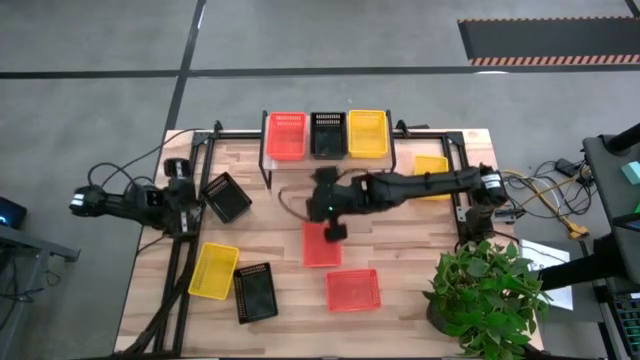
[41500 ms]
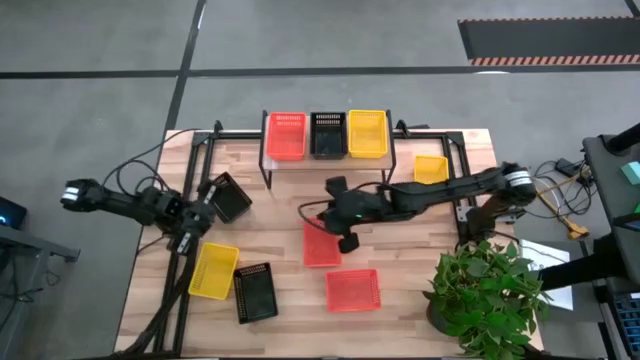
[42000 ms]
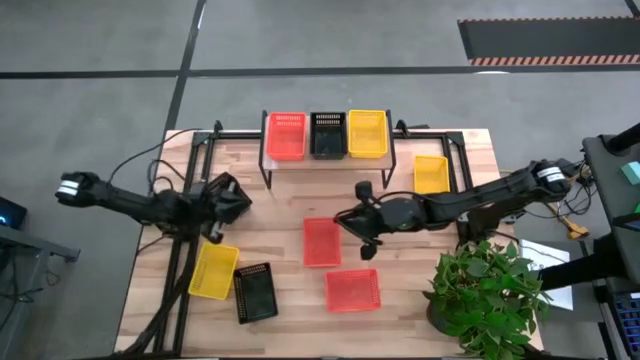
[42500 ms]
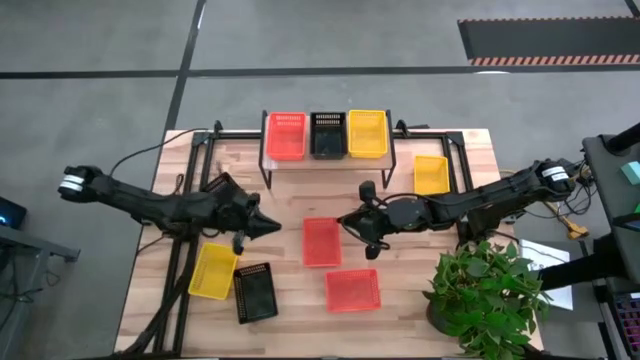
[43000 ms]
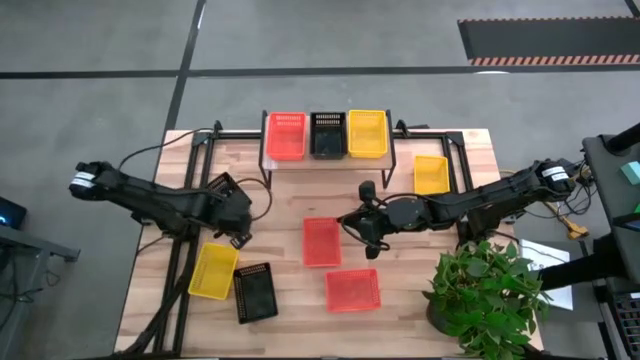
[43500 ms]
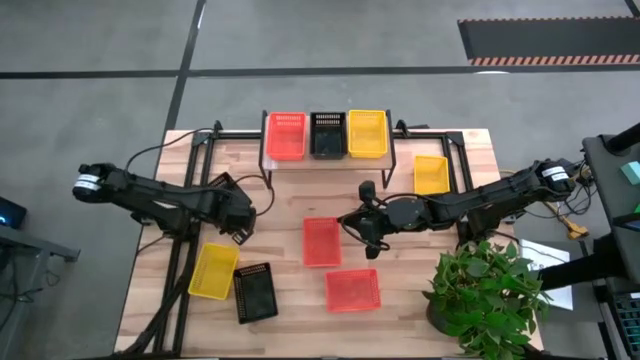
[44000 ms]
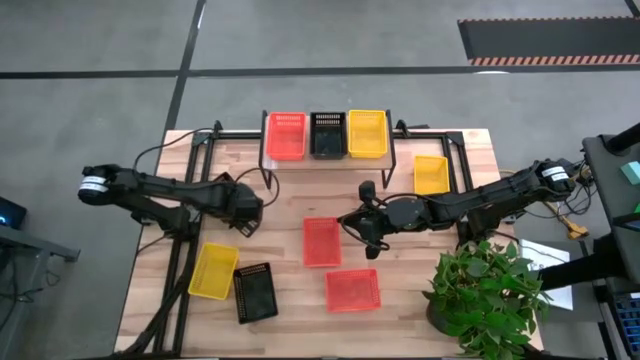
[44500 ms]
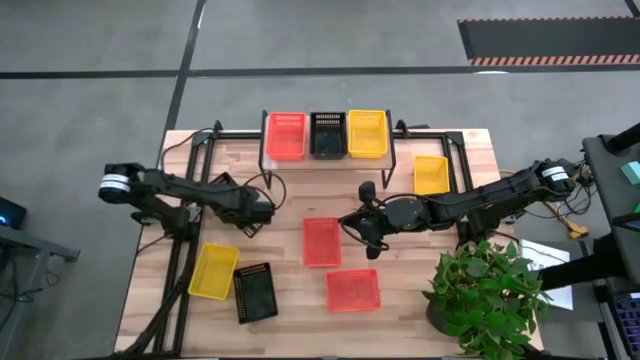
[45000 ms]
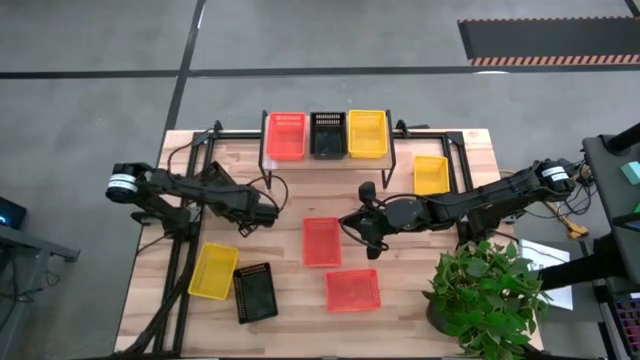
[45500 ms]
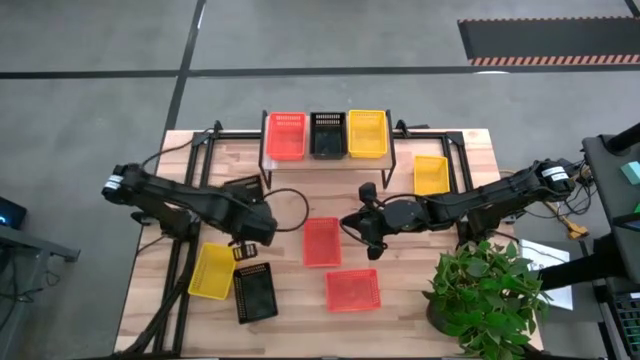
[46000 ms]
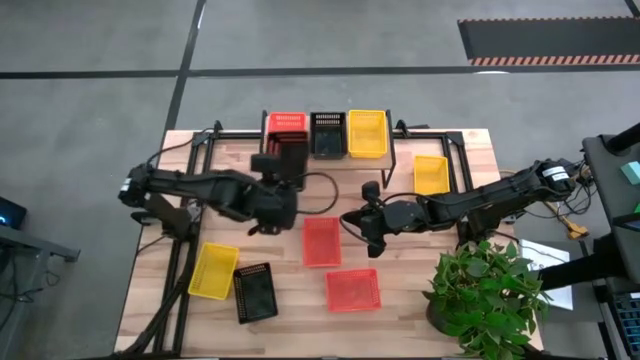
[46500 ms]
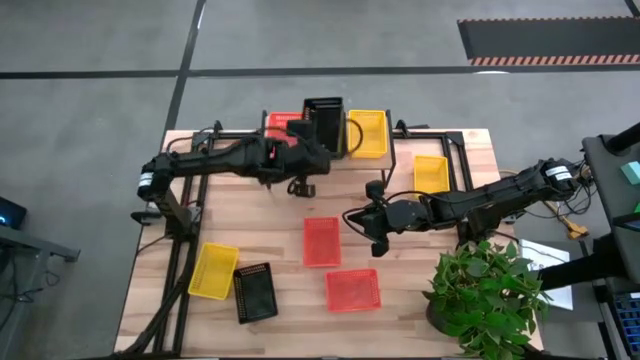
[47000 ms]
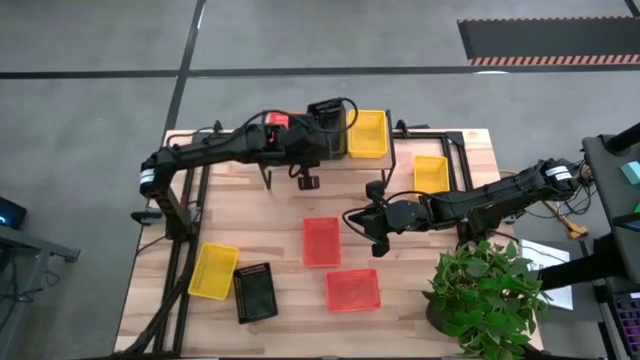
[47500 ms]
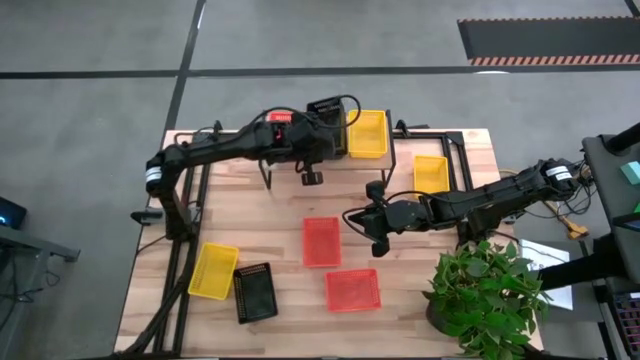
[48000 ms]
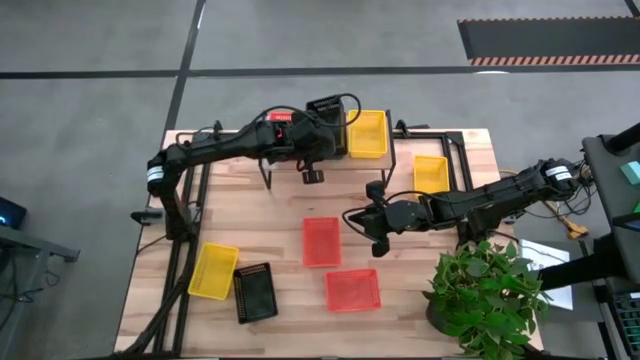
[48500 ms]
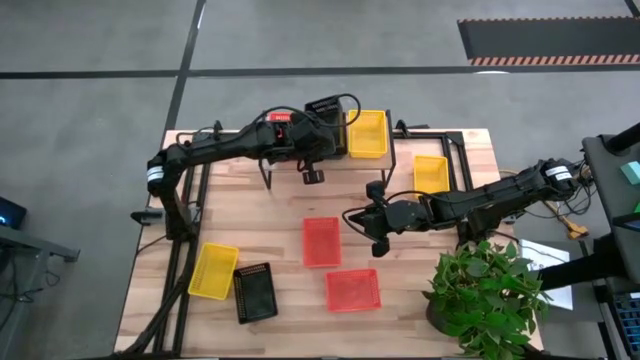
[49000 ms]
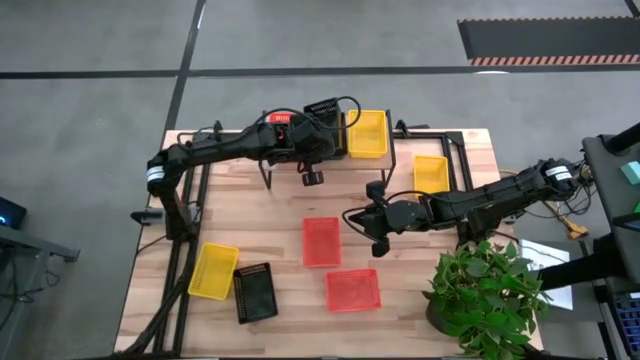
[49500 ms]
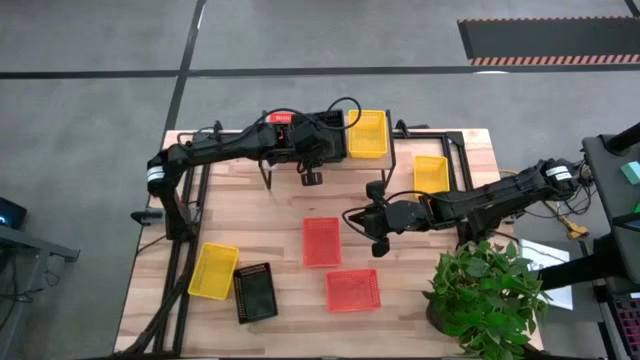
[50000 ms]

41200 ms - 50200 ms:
Stack the top black basket into the black basket on the shelf

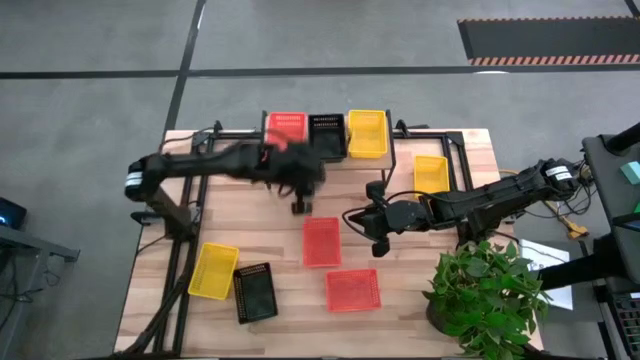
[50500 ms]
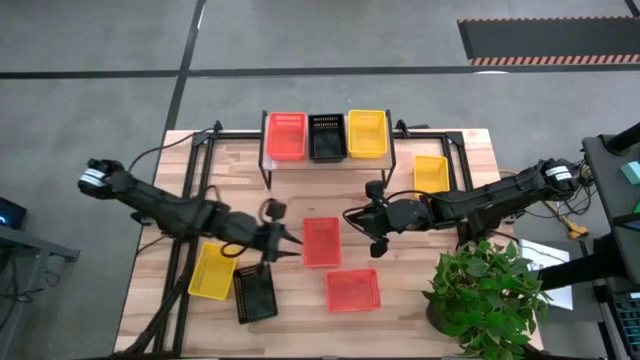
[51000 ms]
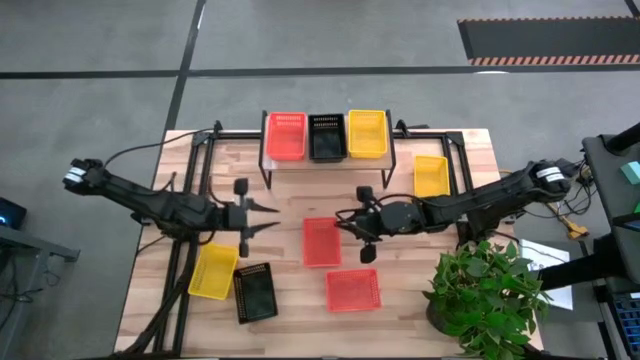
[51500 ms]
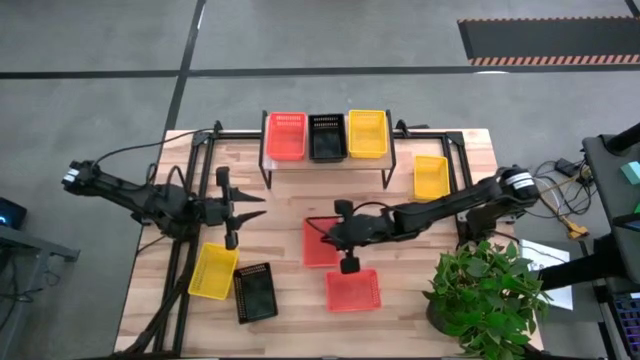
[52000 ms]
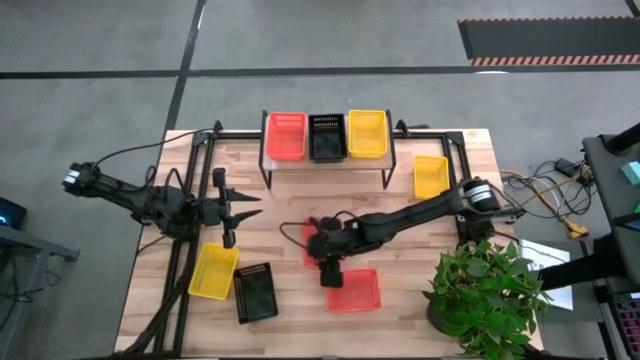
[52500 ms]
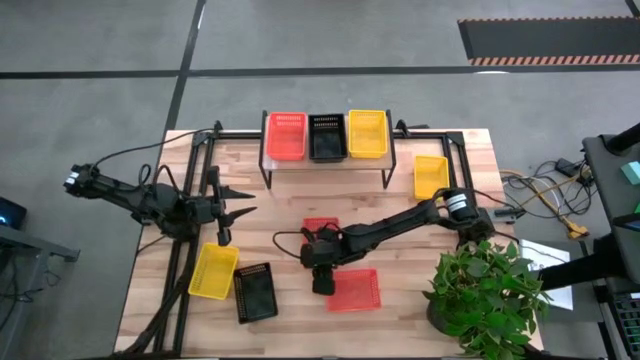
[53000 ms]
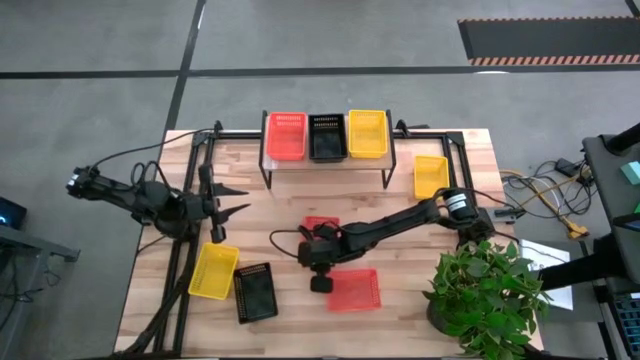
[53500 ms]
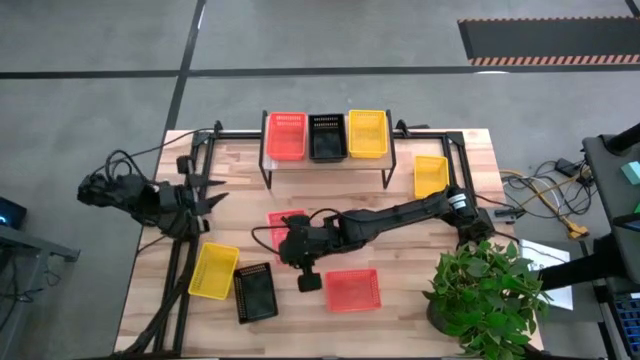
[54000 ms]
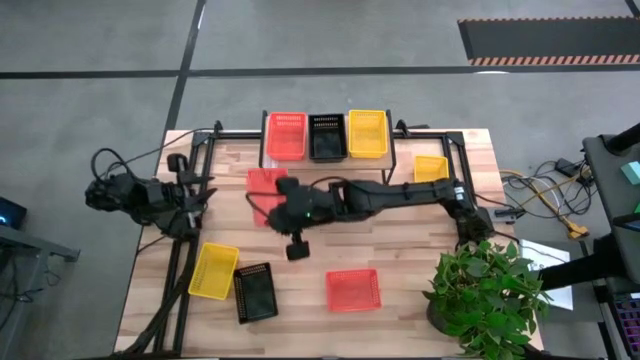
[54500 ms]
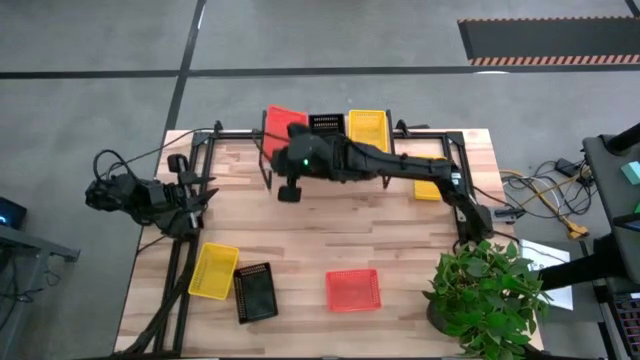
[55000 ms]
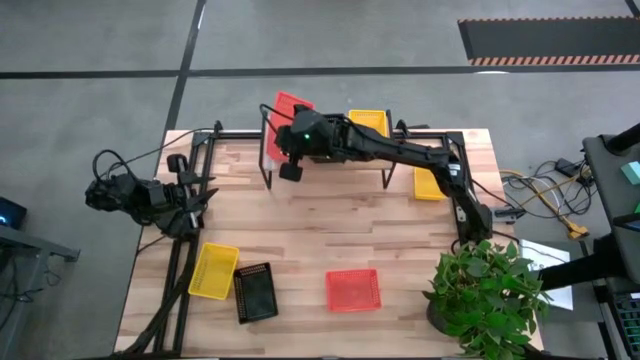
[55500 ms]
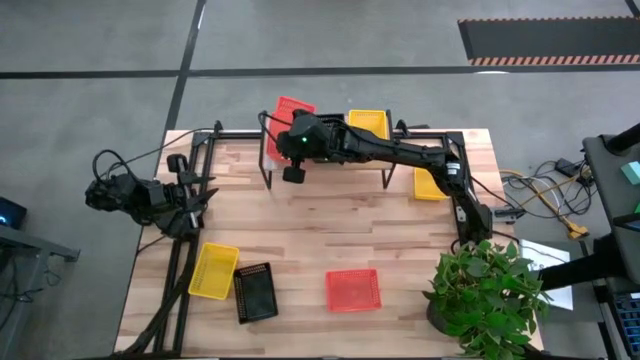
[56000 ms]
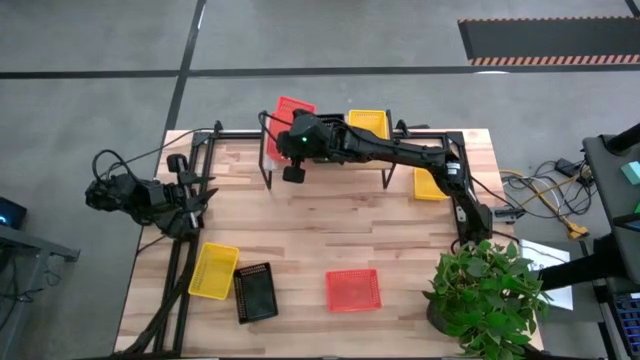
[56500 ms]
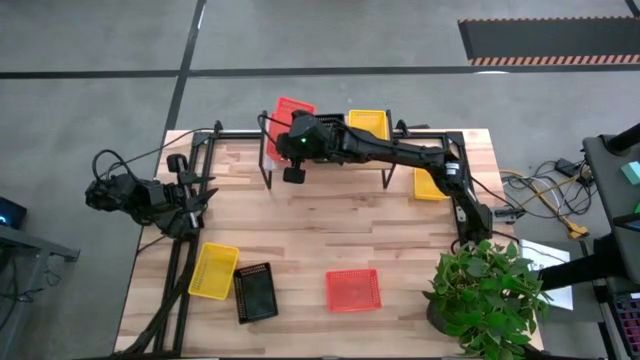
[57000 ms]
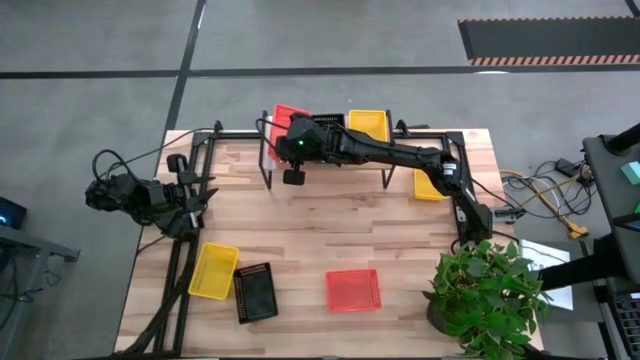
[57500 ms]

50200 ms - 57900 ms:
Stack the top orange basket into the orange basket on the shelf

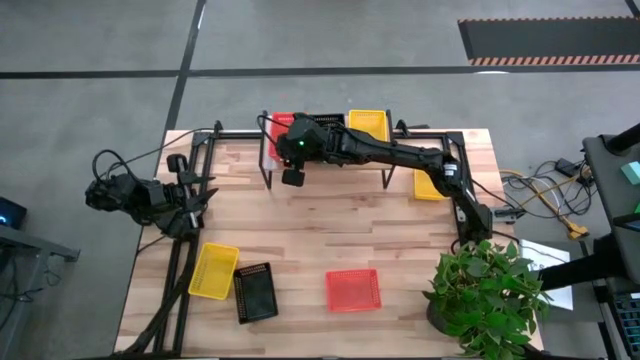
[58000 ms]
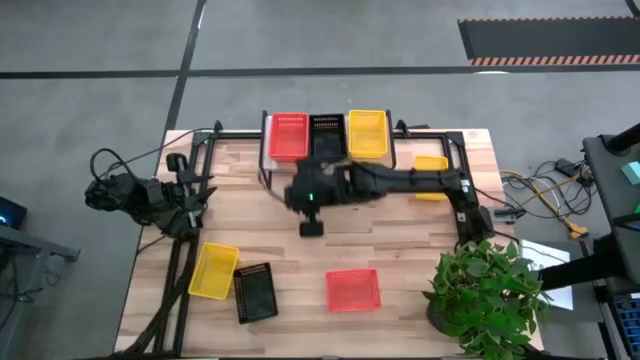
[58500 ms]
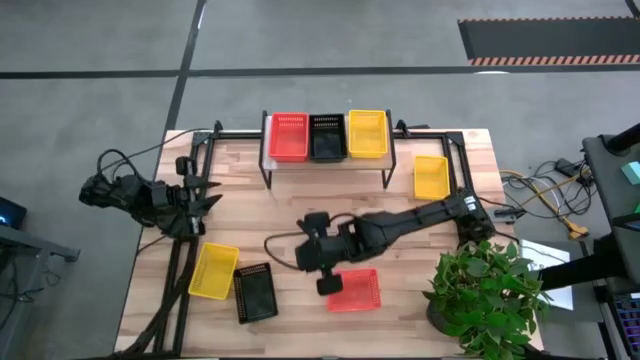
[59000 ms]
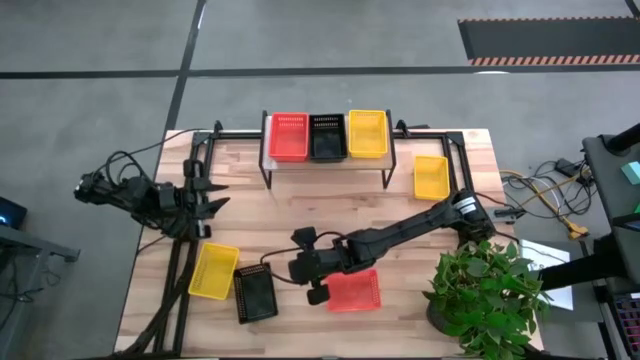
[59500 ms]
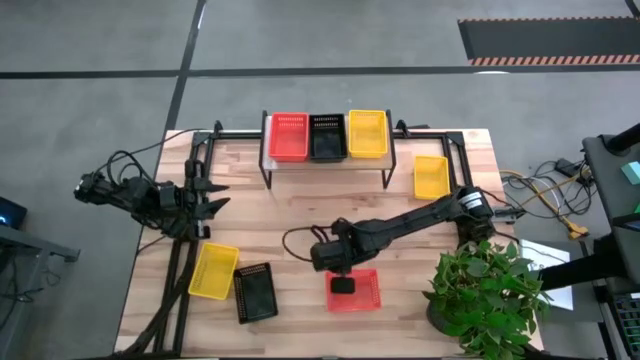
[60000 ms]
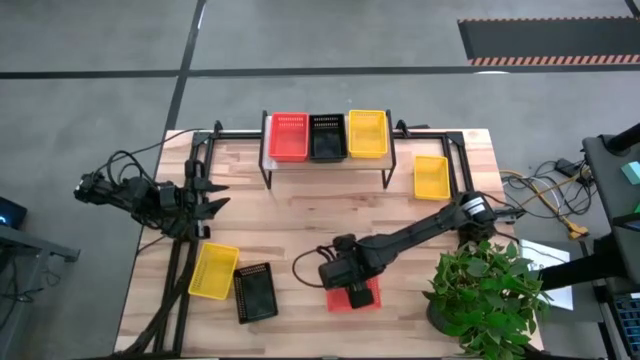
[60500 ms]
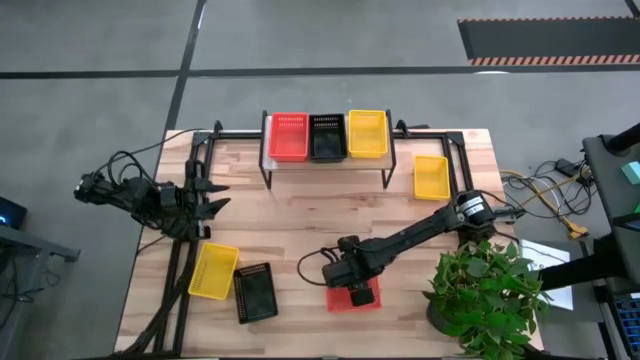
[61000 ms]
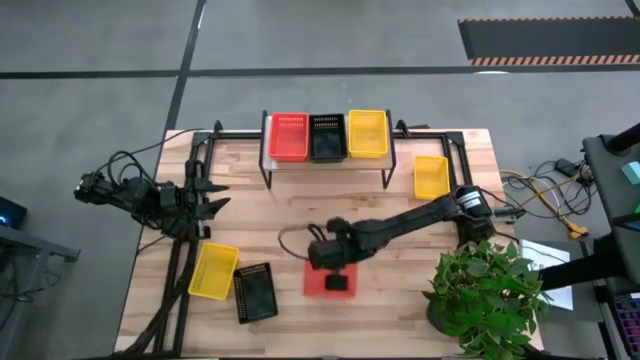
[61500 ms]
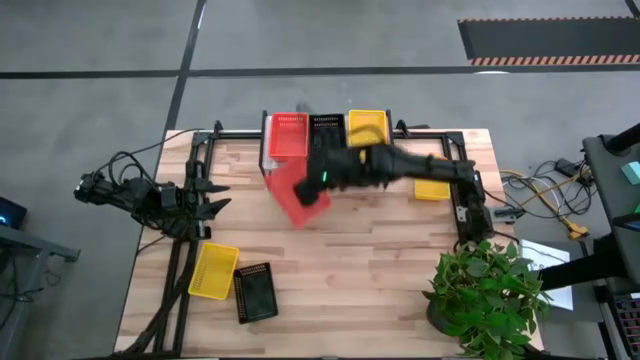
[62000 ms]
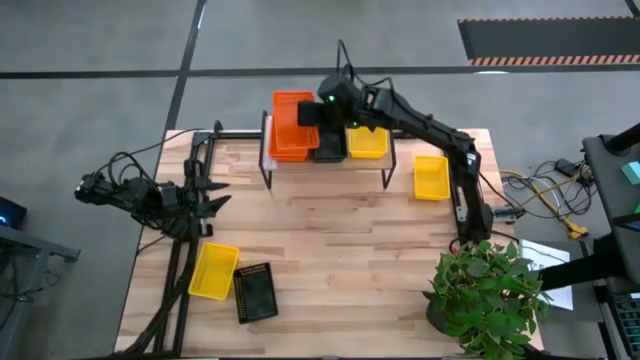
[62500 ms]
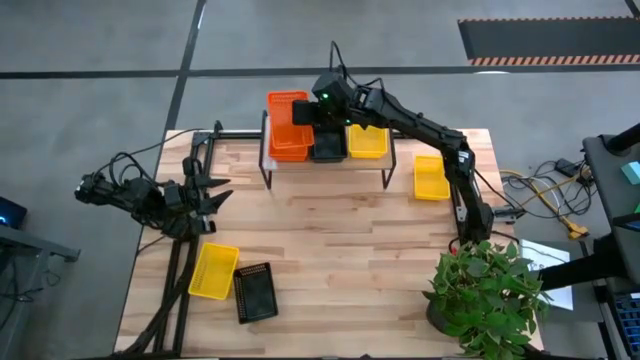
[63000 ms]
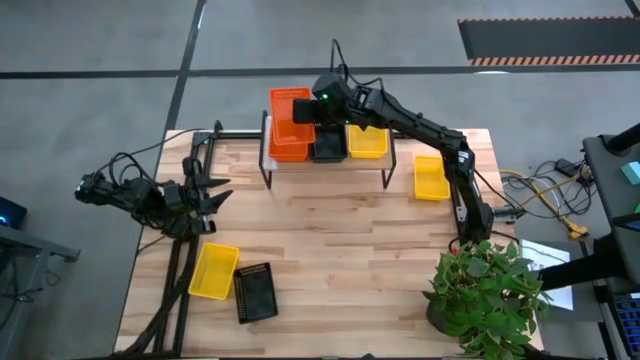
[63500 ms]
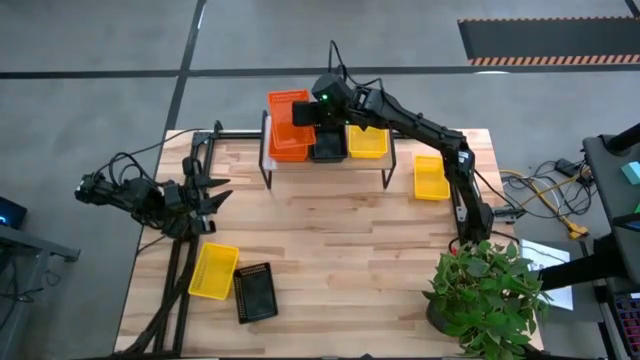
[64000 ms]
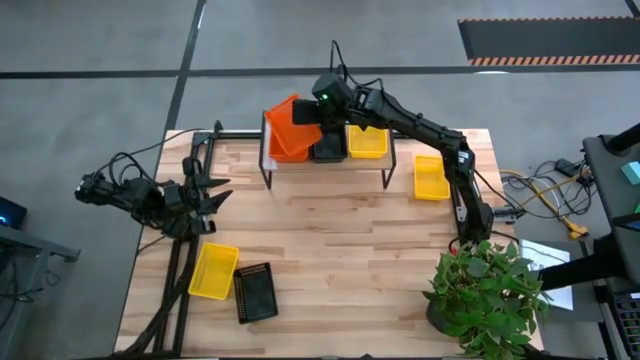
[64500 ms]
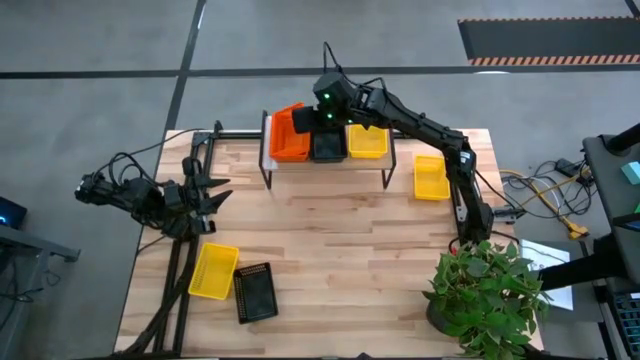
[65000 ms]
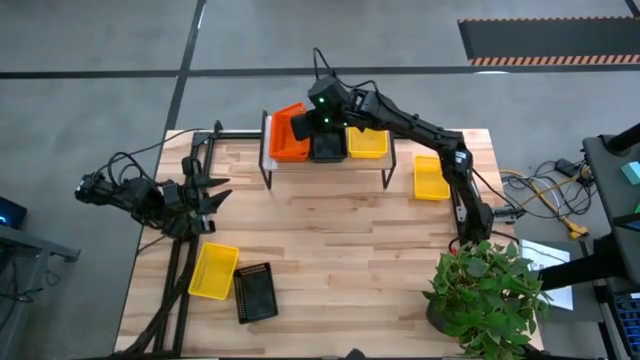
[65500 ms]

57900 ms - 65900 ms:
Stack the orange basket into the stacked orange basket on the shelf
